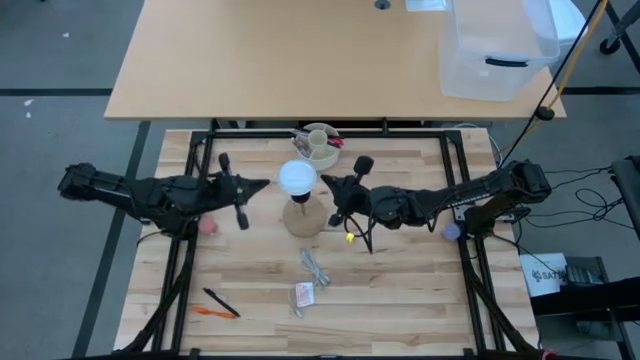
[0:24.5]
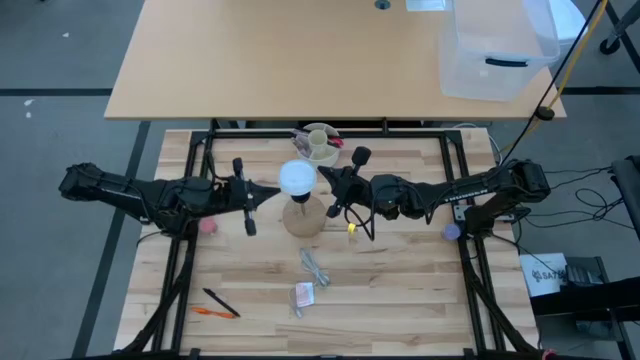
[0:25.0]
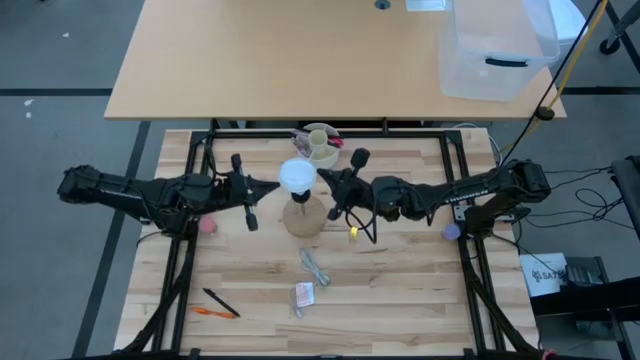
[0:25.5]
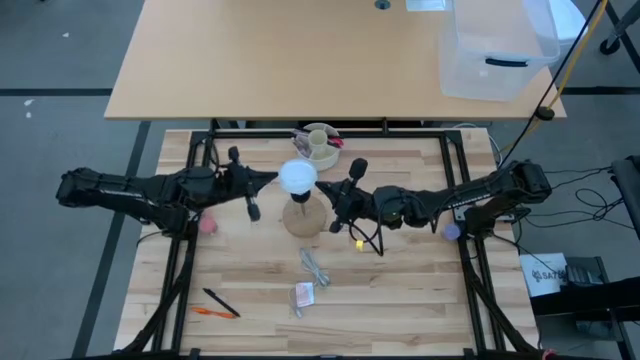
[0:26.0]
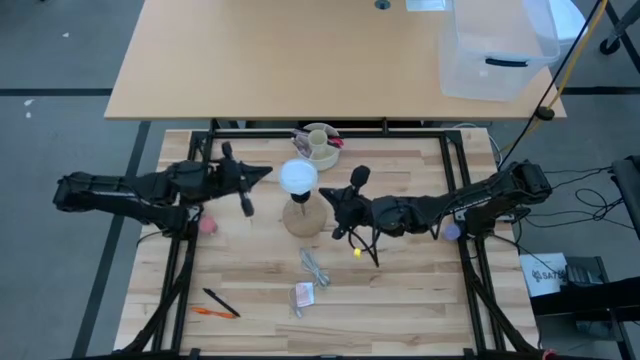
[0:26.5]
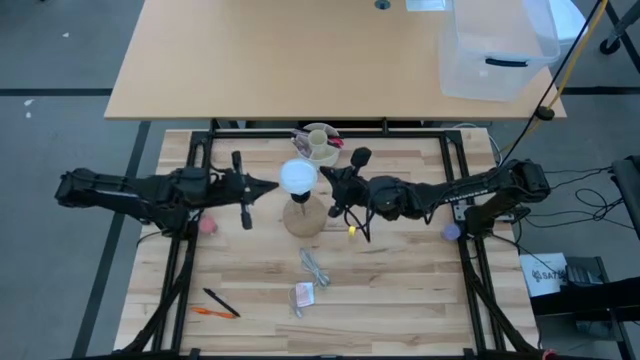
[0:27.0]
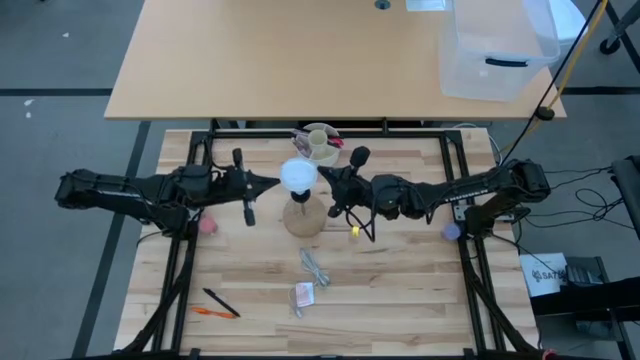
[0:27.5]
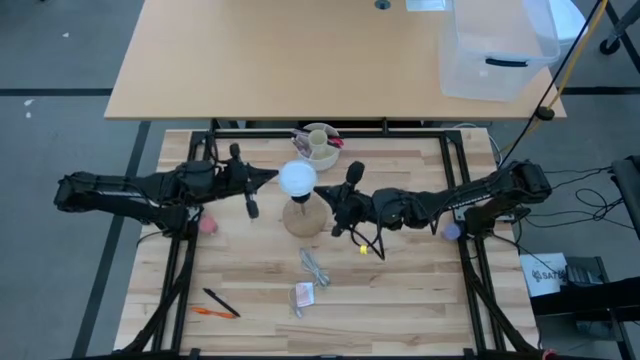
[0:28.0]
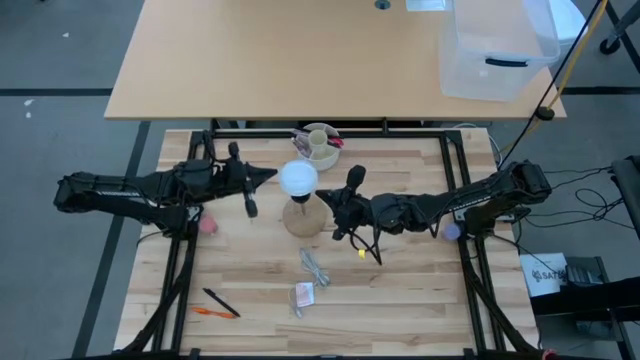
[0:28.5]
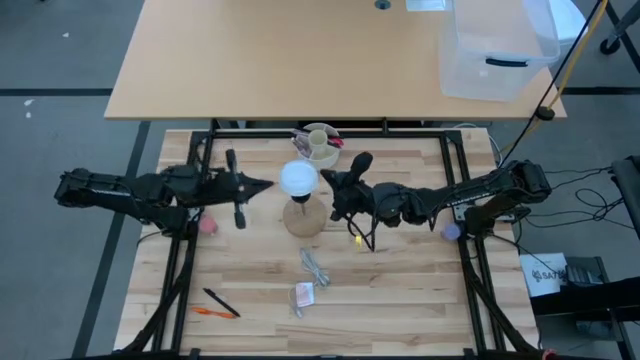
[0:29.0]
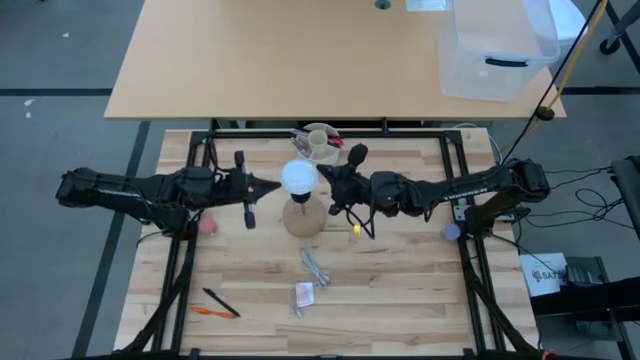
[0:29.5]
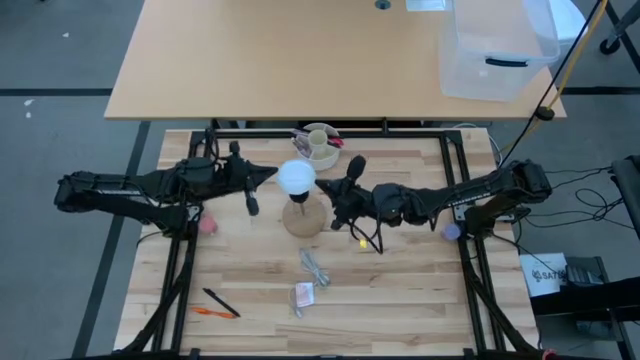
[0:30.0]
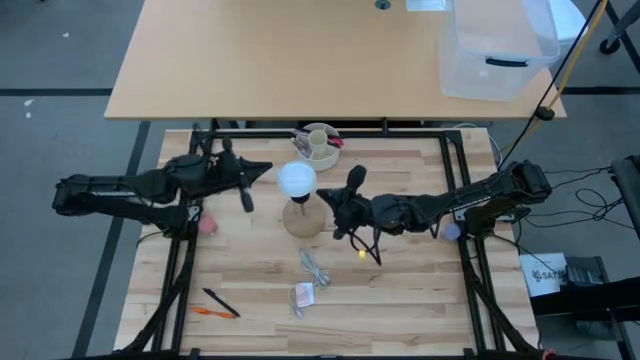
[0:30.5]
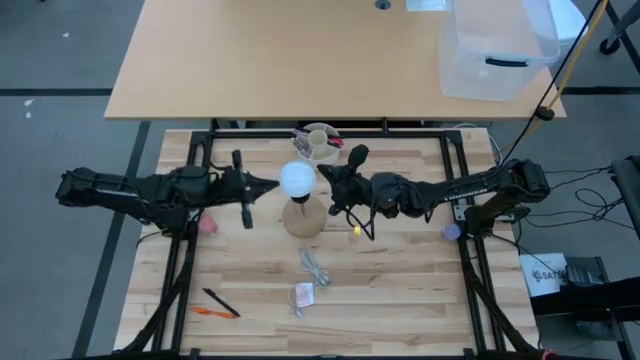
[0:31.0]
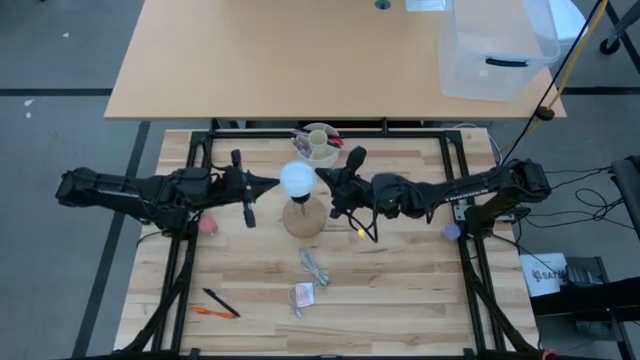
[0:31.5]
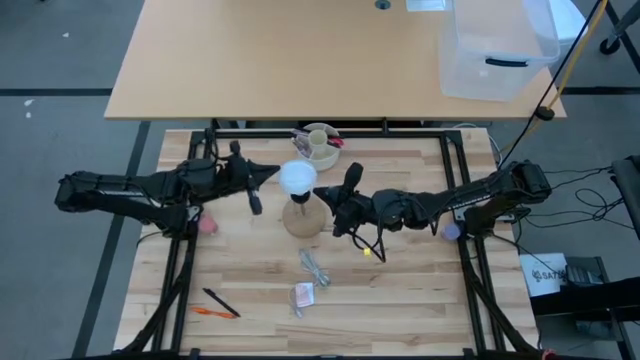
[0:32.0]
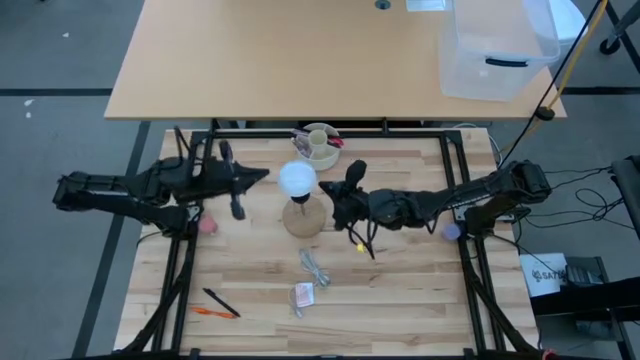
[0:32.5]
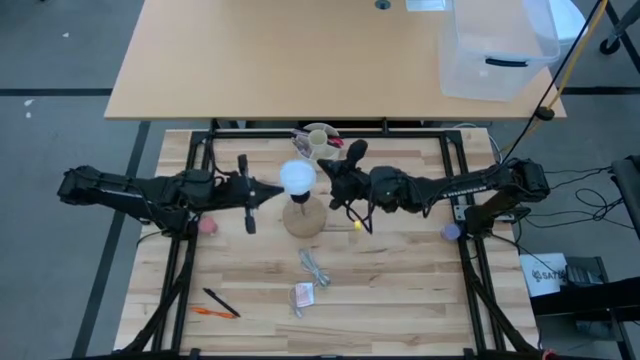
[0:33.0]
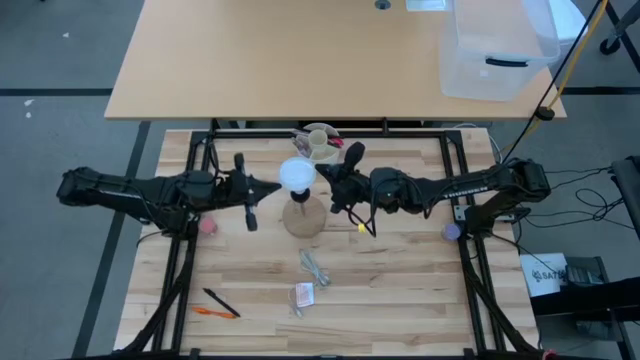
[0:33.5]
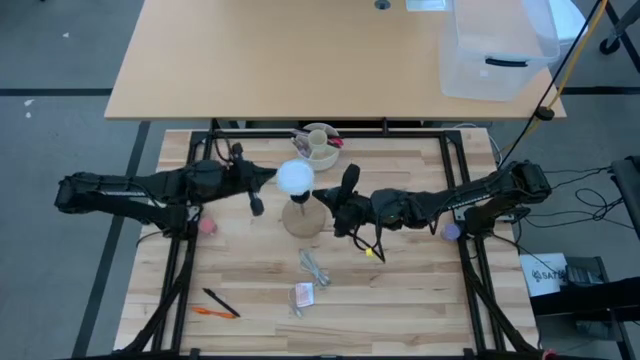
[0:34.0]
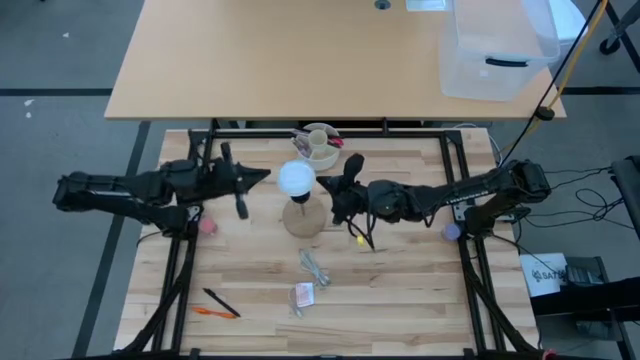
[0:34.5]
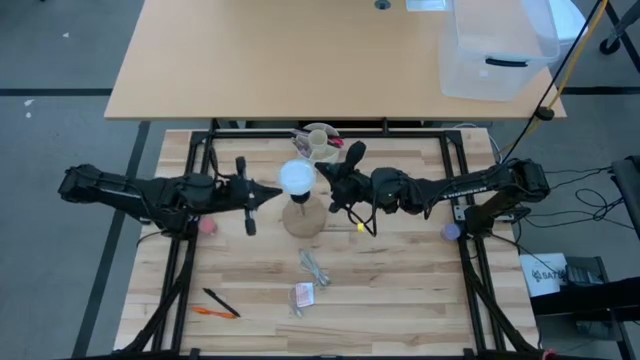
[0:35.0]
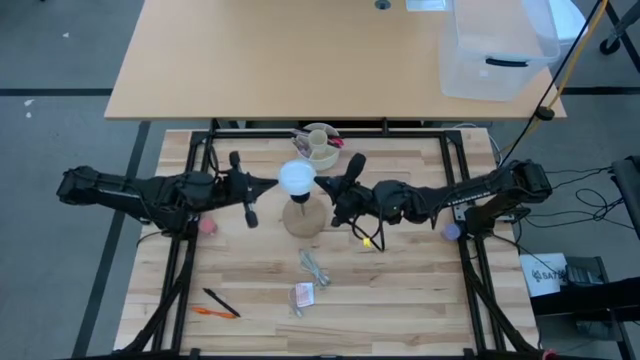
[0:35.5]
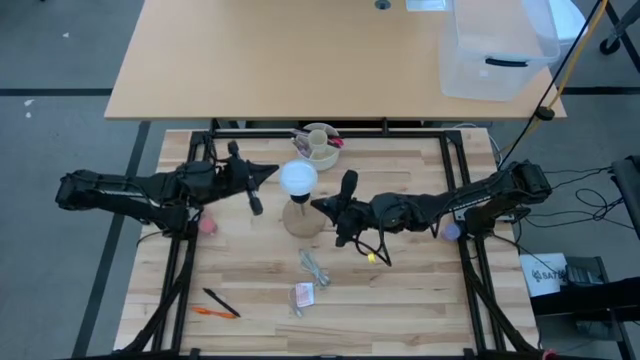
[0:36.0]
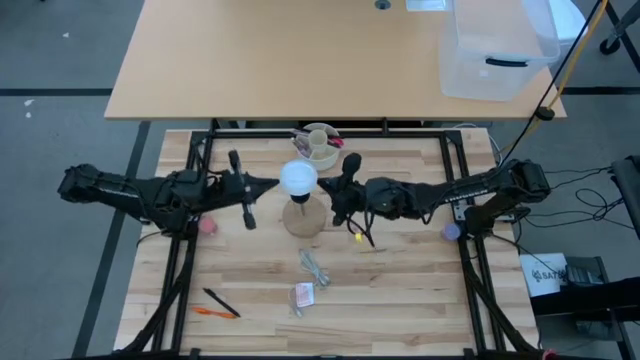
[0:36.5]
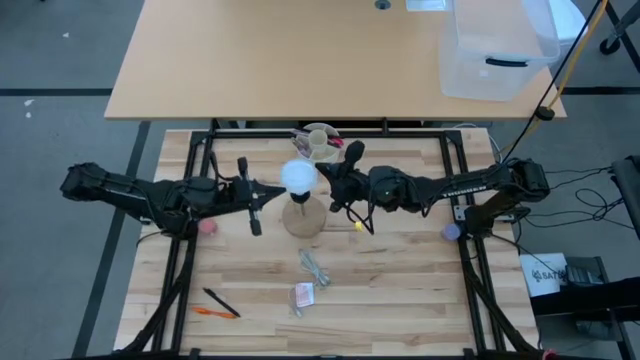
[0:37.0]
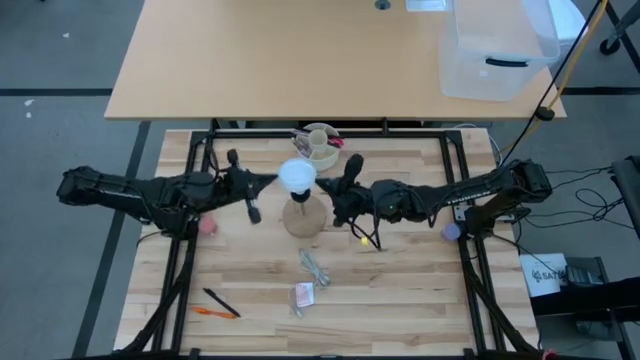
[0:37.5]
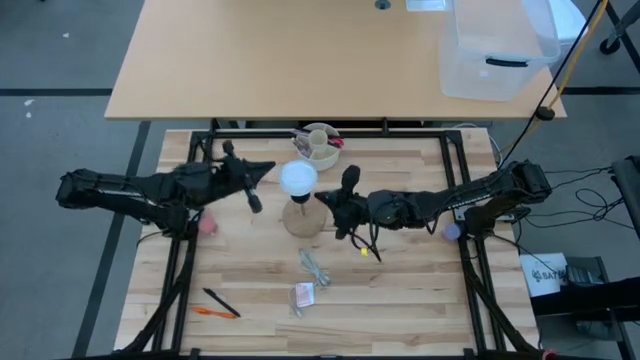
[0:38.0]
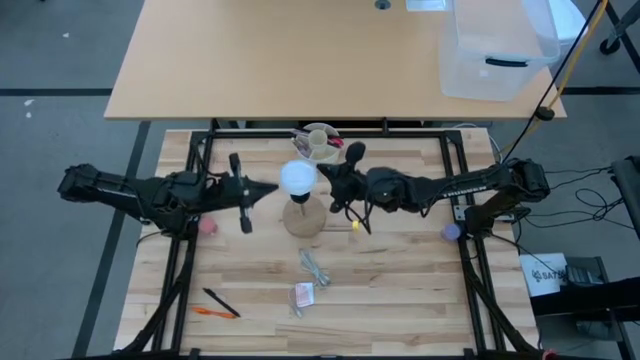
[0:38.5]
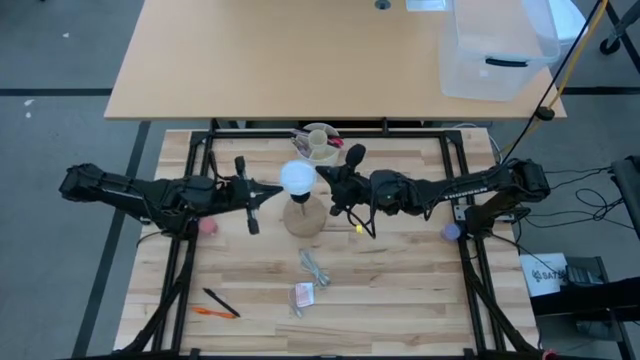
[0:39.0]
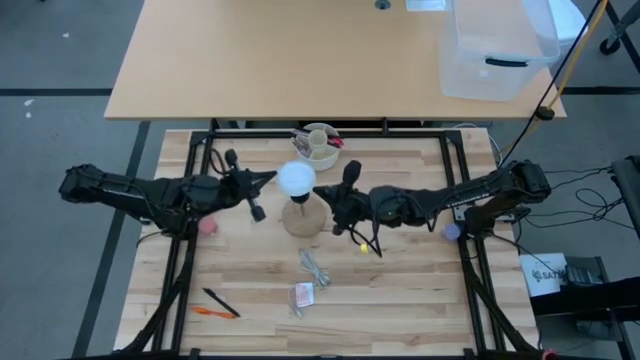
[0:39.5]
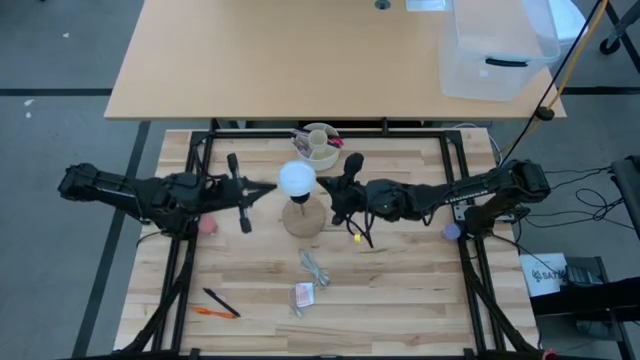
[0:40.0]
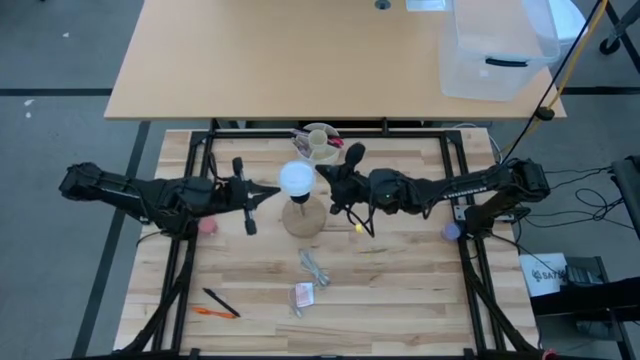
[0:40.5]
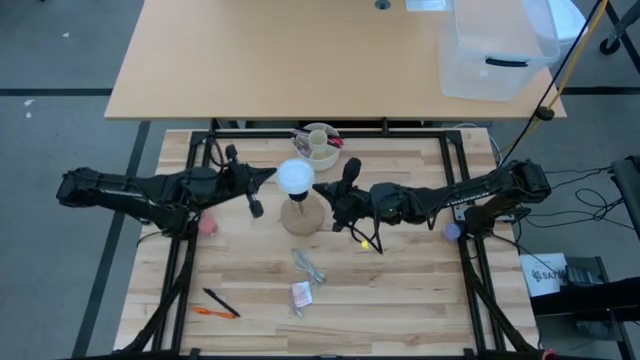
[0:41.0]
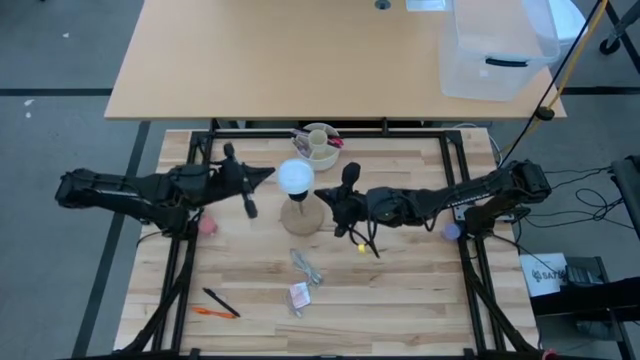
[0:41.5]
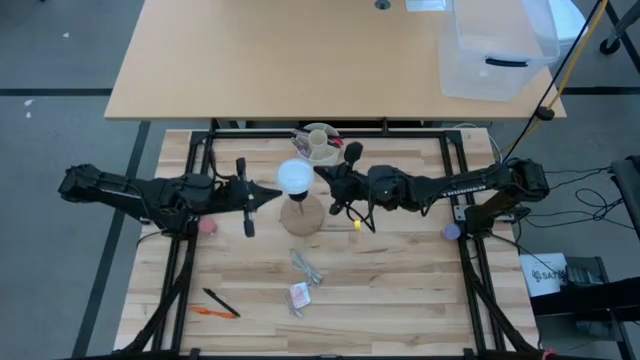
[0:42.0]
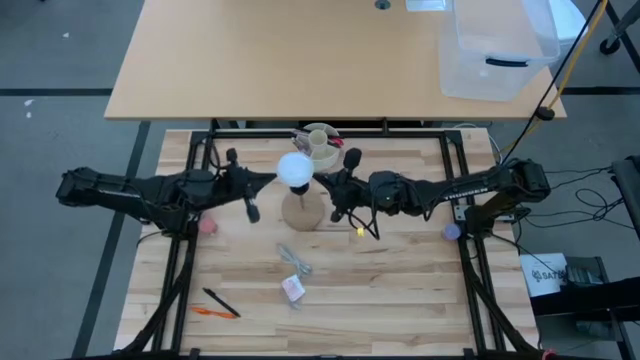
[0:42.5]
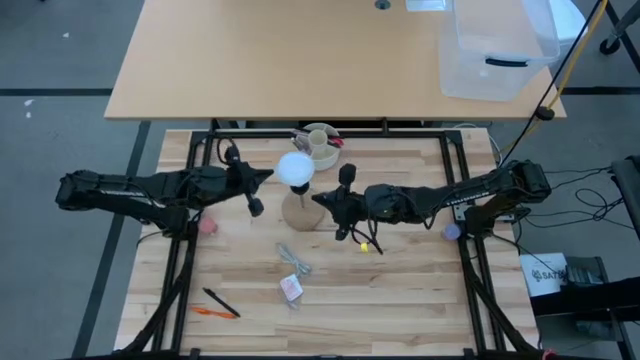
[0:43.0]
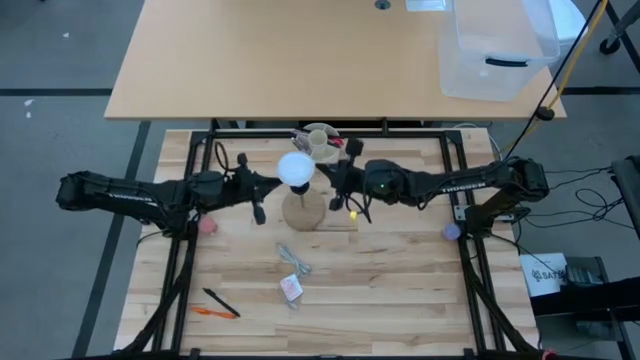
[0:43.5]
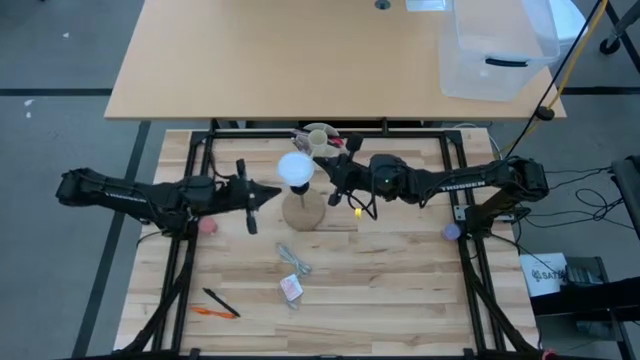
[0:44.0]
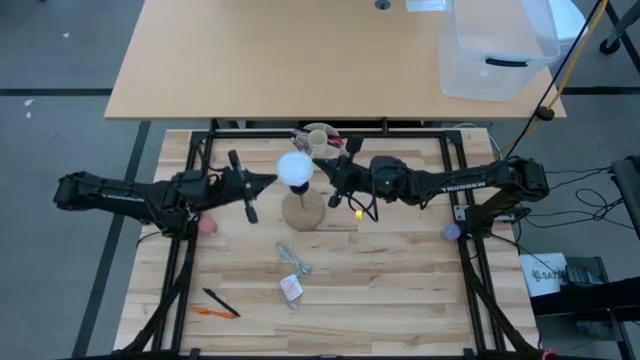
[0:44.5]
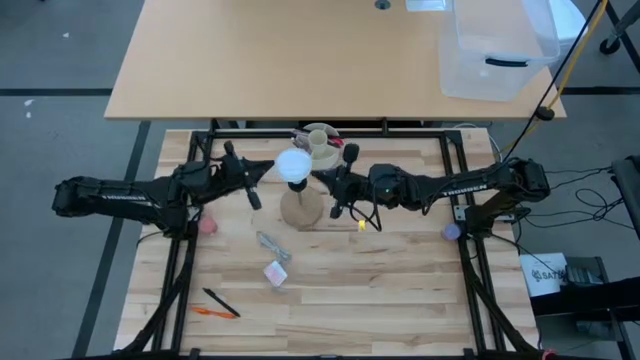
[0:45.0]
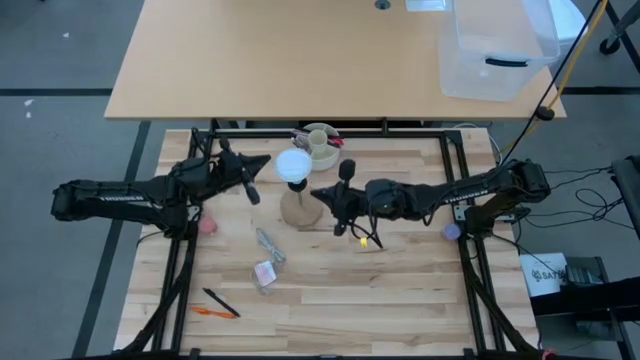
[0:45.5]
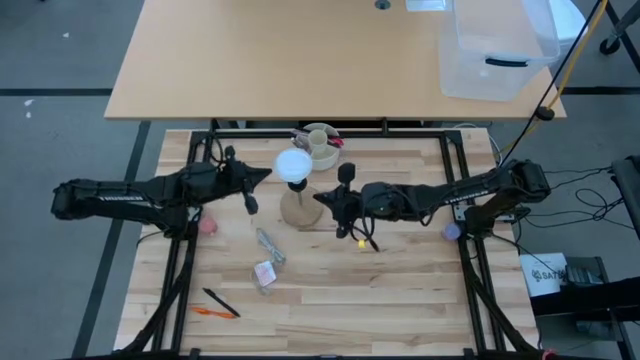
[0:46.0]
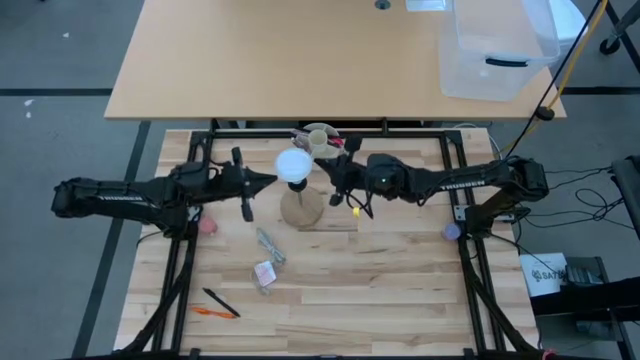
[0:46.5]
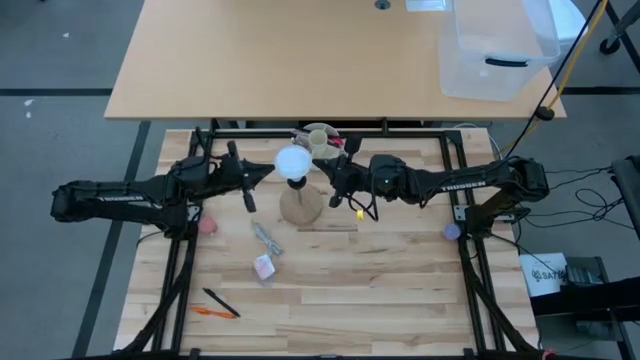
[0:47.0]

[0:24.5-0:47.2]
Task: Screw lightbulb
Insert the lightbulb into the wooden lamp
